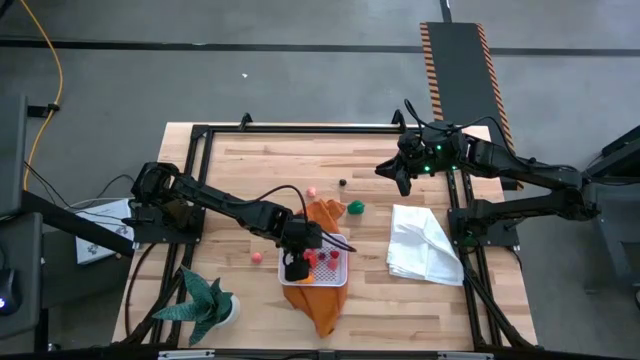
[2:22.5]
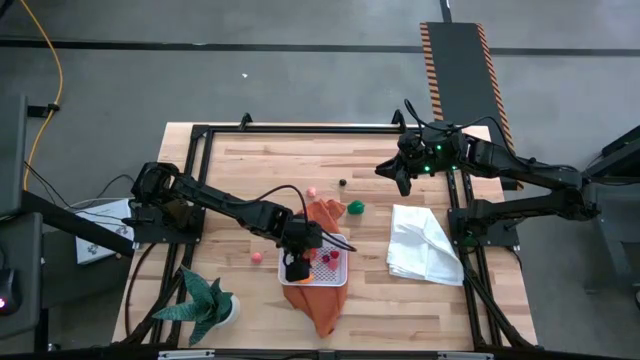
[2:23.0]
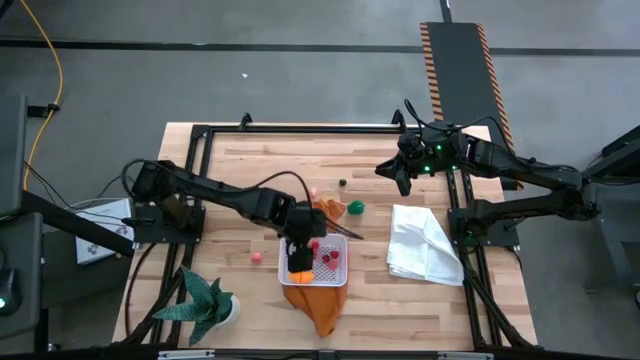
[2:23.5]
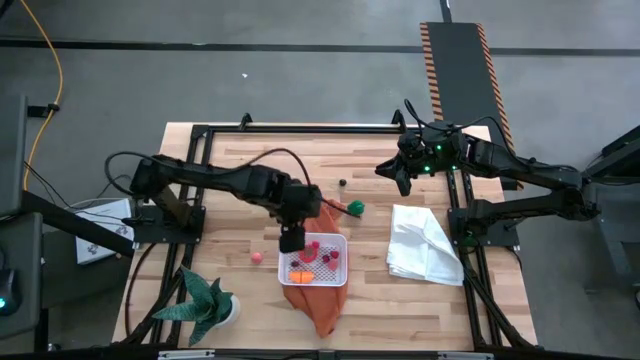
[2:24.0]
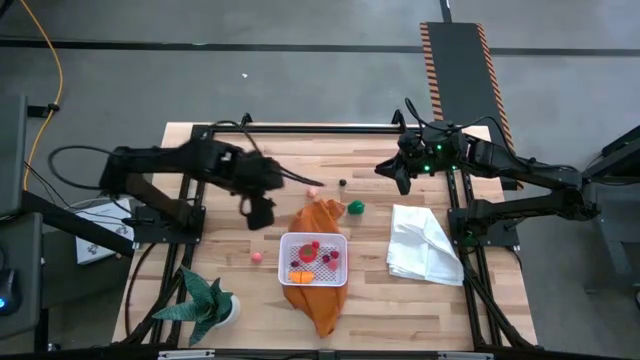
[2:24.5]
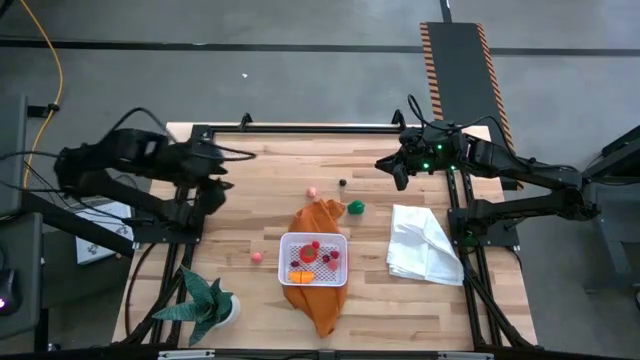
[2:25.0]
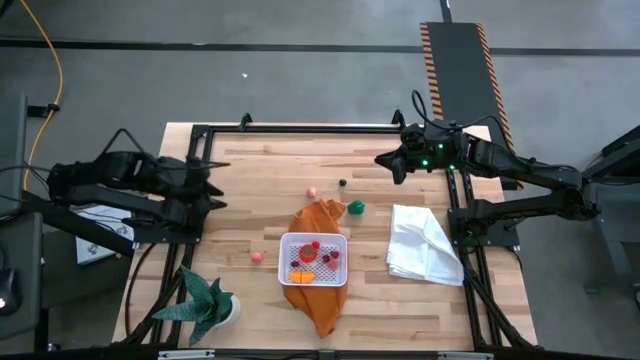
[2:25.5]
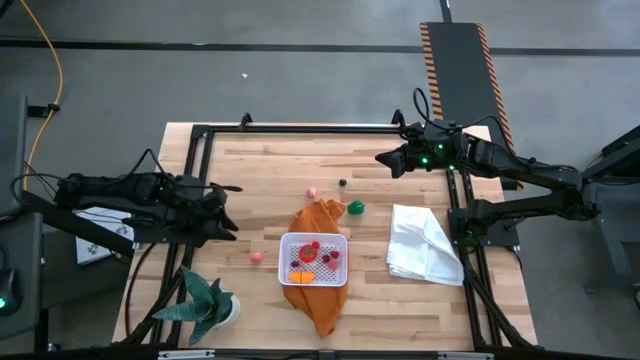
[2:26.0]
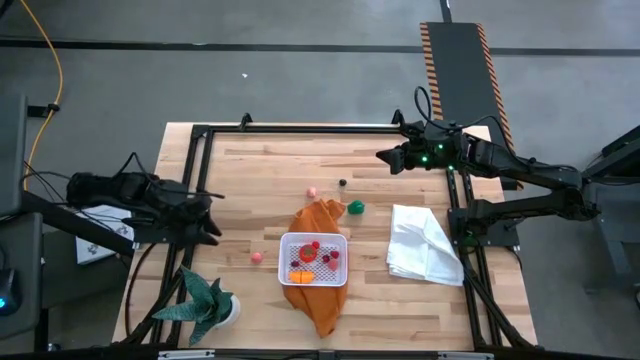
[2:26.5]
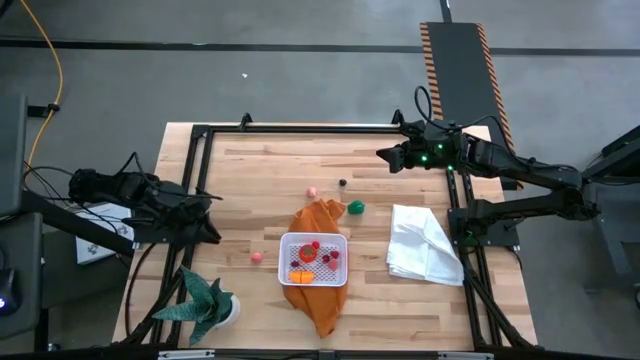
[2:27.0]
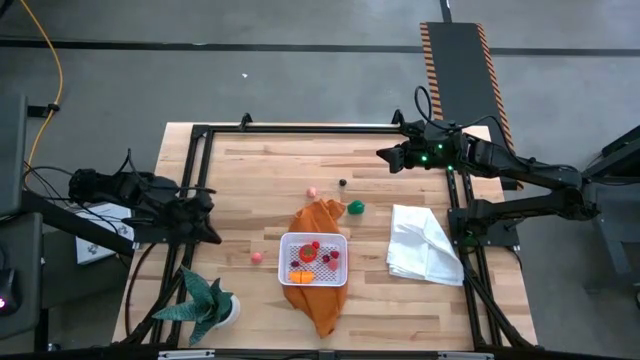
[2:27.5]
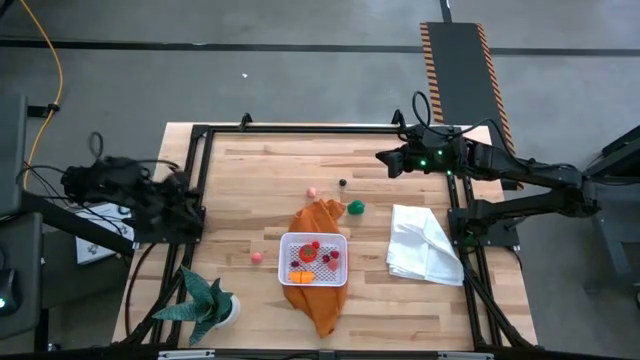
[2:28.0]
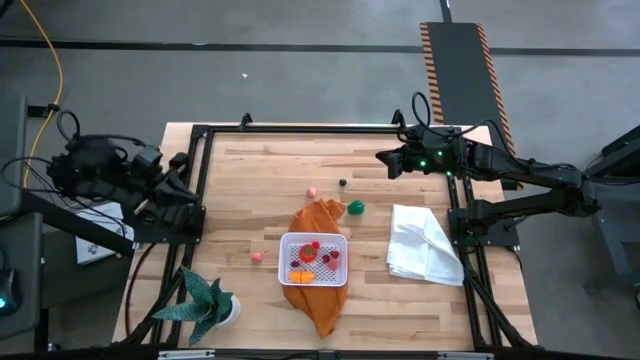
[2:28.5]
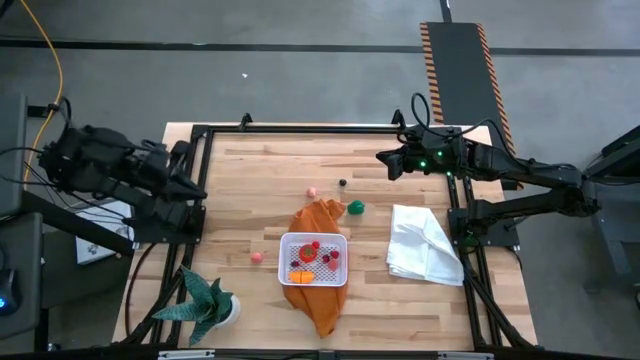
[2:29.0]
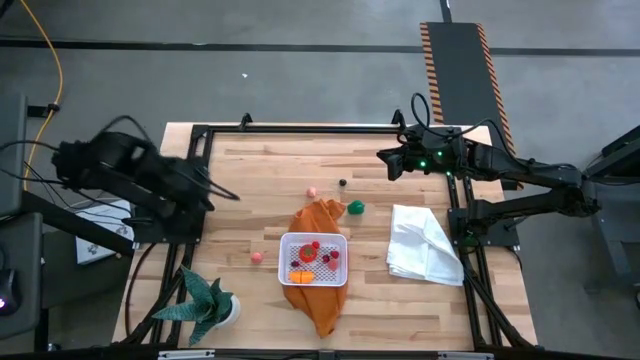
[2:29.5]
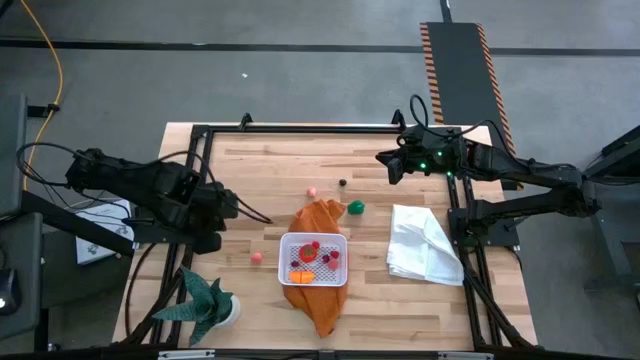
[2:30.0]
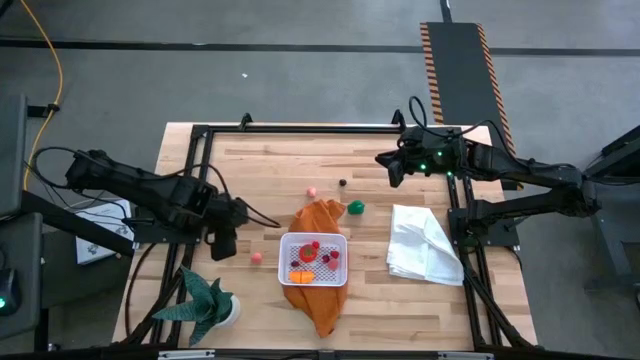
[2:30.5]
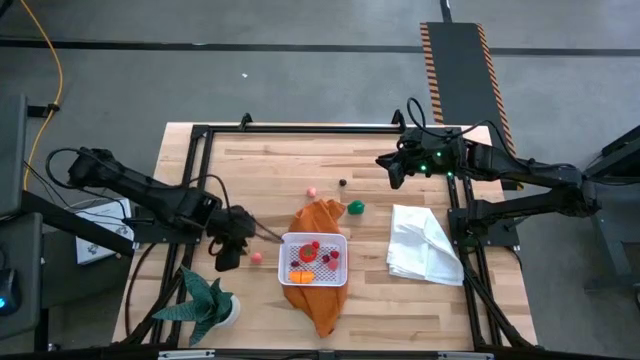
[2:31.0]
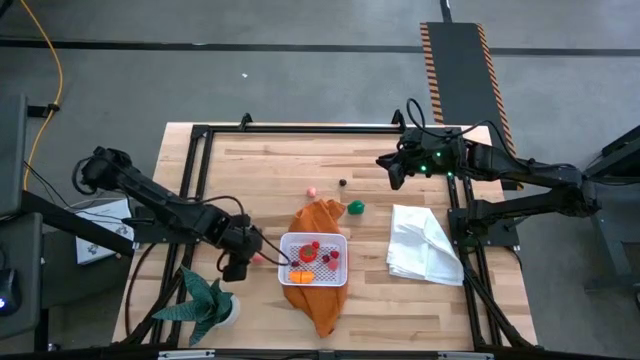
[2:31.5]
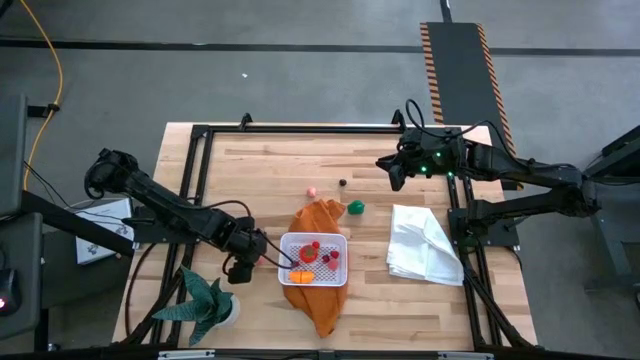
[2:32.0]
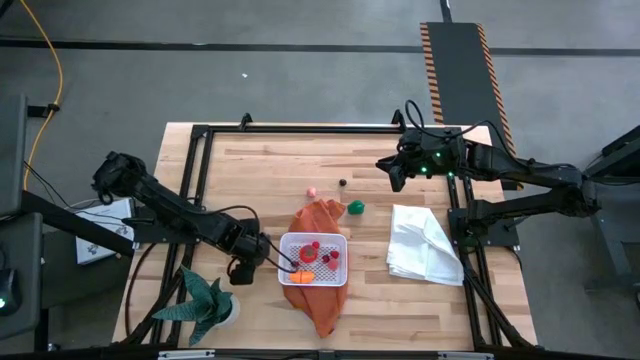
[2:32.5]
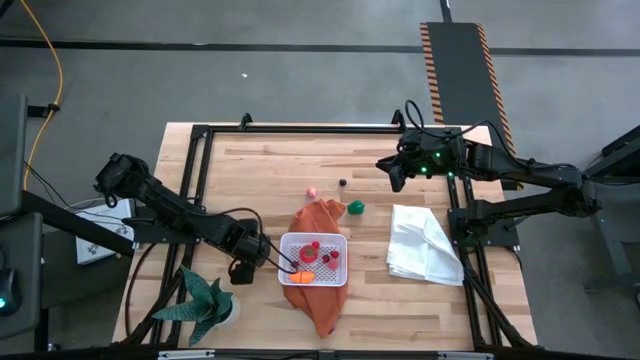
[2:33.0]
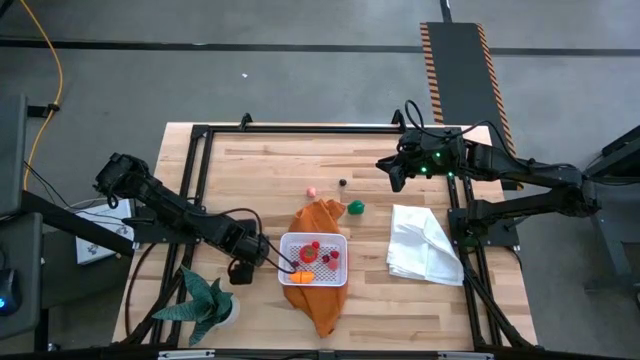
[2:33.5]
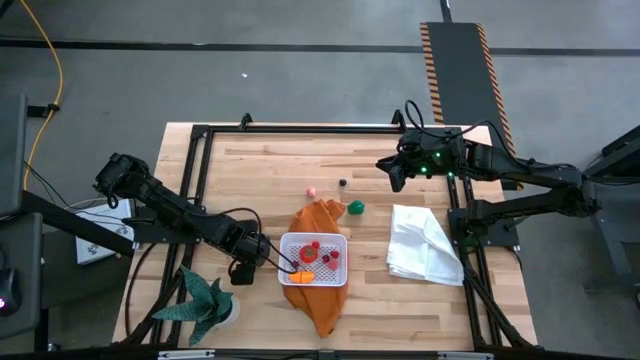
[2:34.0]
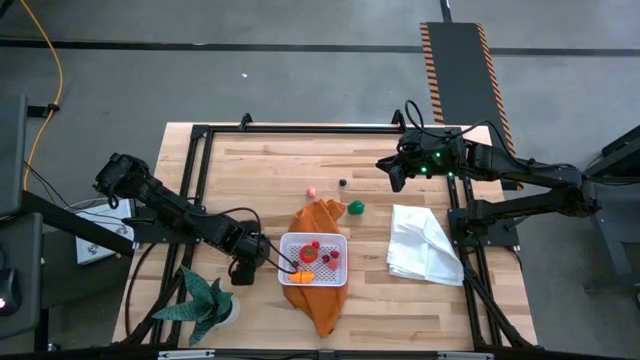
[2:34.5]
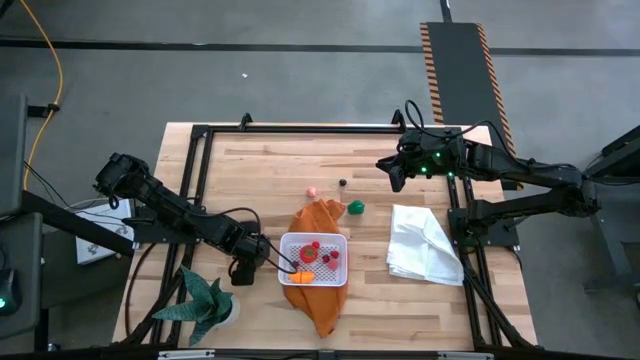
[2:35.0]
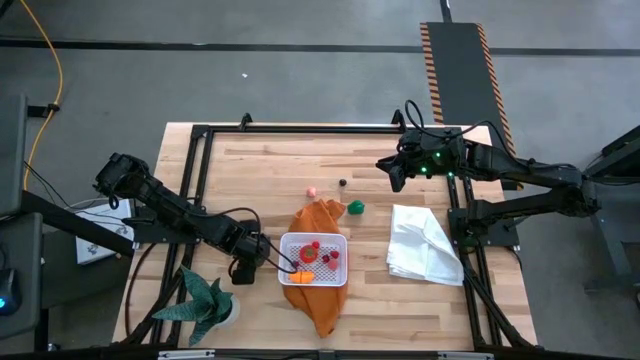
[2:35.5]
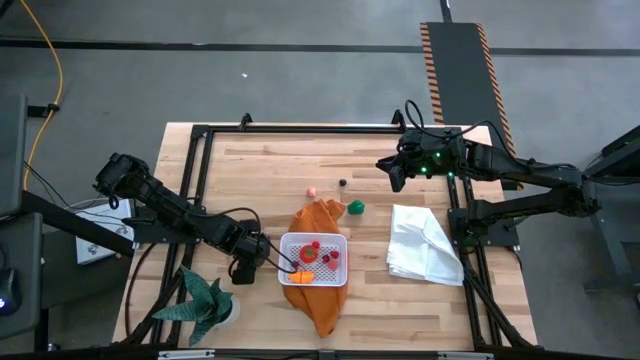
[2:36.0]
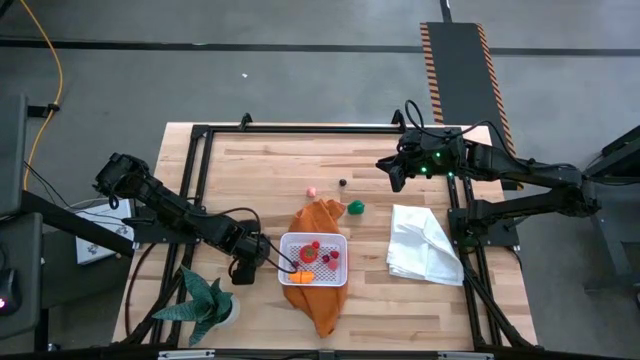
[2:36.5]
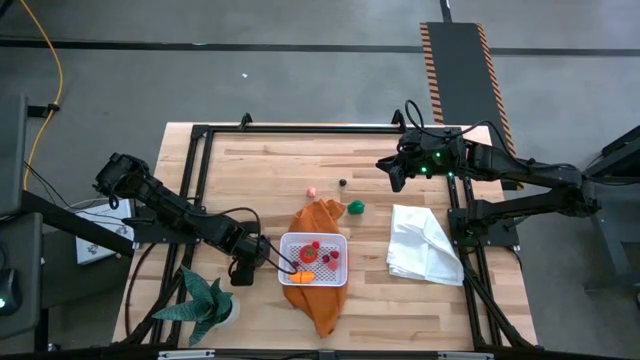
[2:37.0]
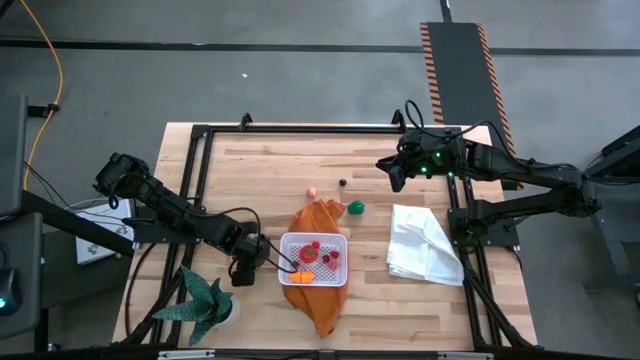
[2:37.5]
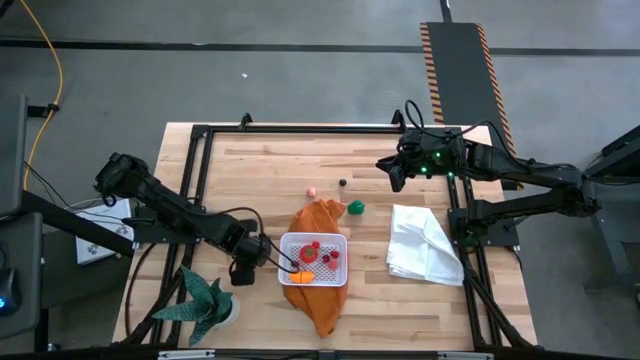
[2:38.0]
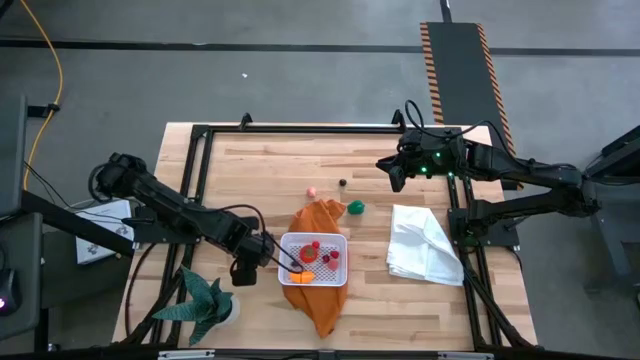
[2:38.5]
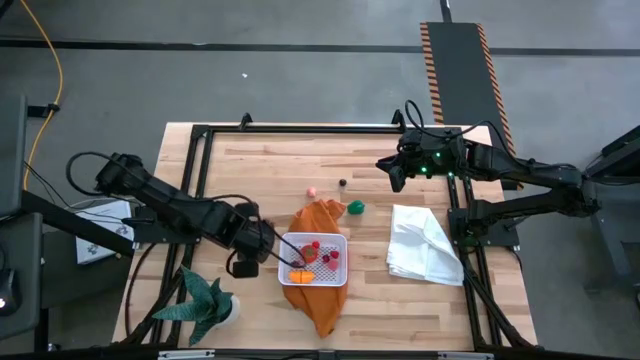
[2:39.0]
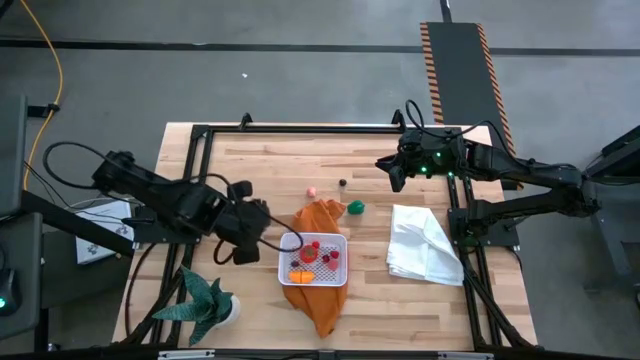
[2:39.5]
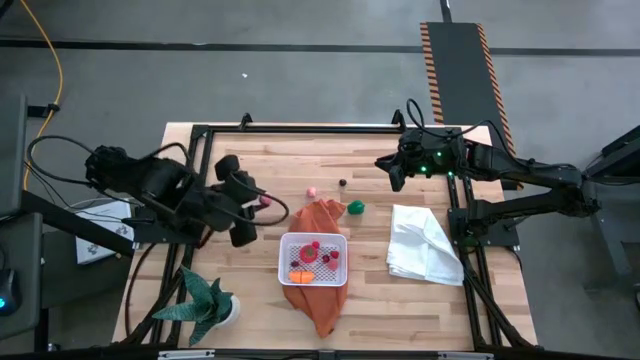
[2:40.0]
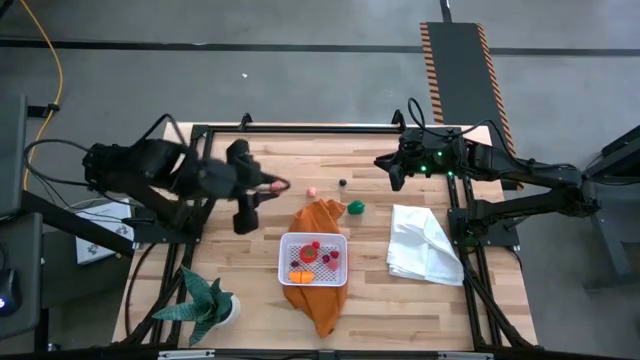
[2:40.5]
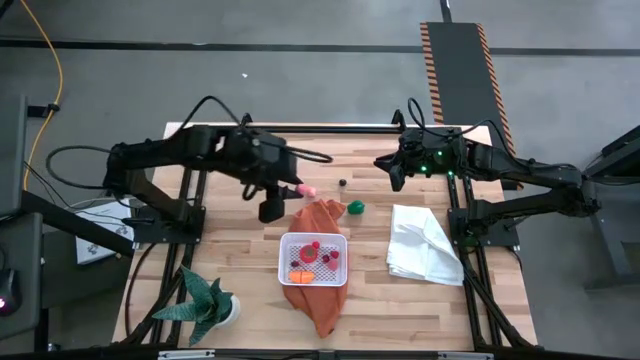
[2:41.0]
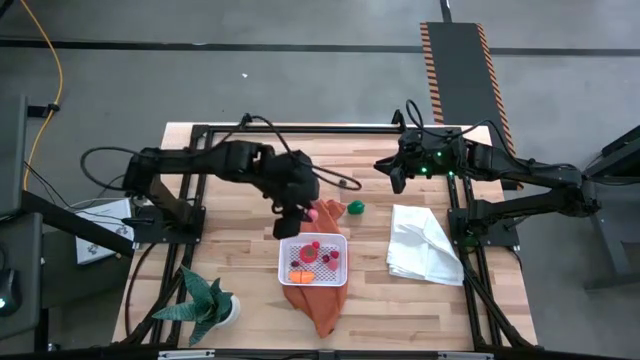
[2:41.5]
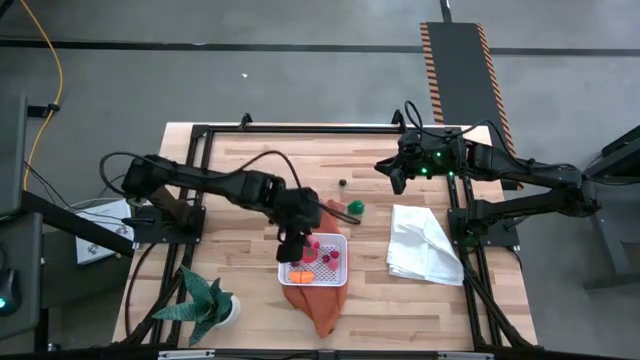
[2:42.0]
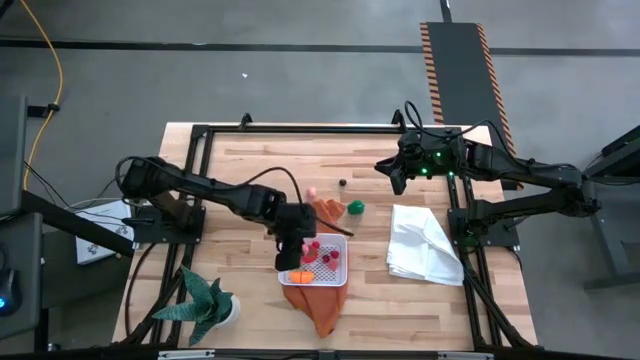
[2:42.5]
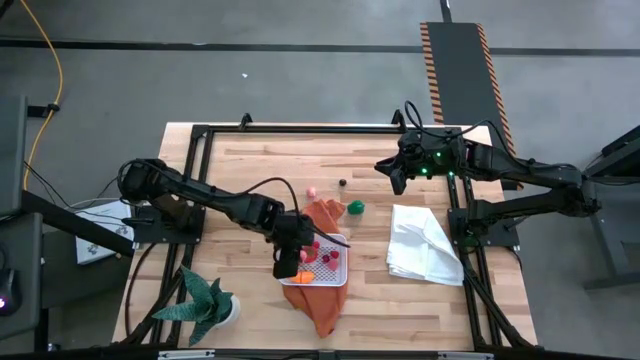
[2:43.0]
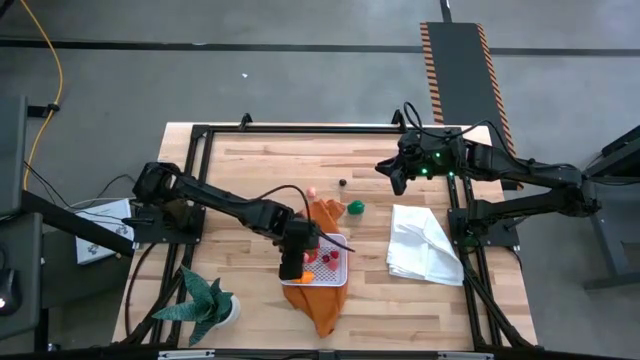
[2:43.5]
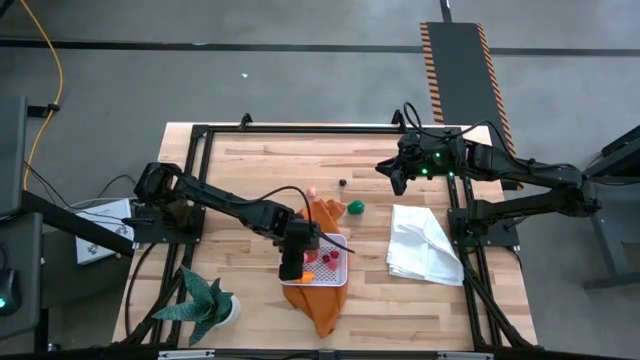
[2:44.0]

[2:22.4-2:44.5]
Task: Pick and placing Produce into tupperware
Put the bottom pink peach into the white basket
